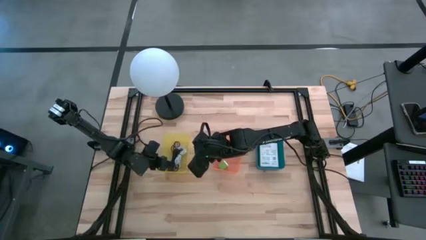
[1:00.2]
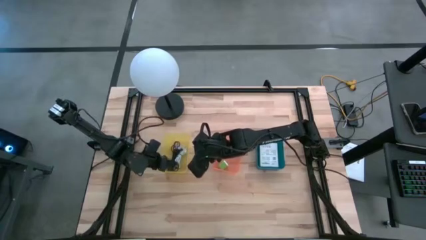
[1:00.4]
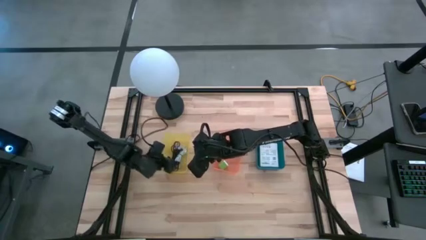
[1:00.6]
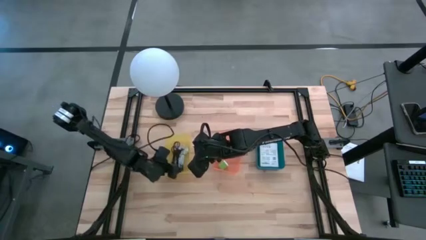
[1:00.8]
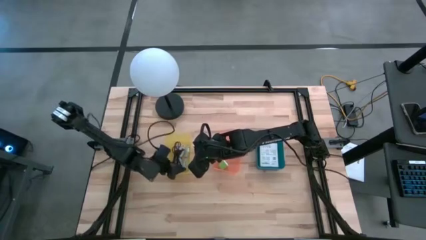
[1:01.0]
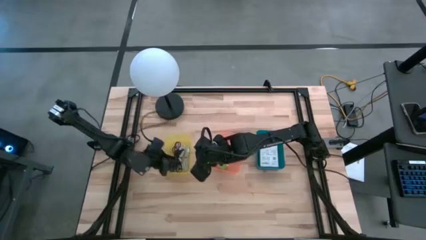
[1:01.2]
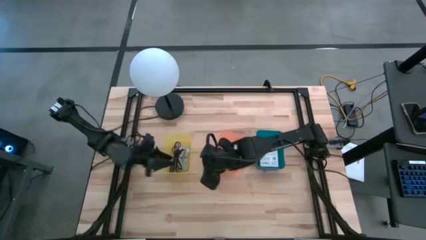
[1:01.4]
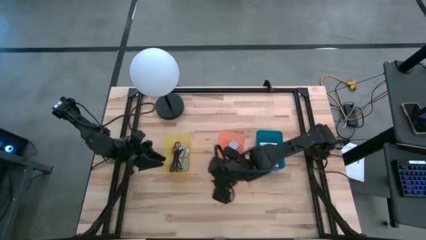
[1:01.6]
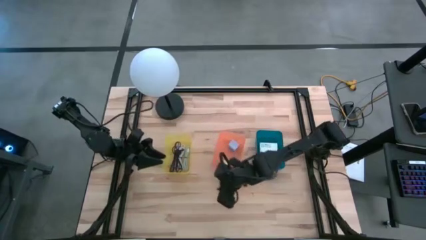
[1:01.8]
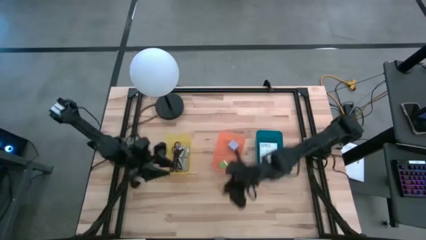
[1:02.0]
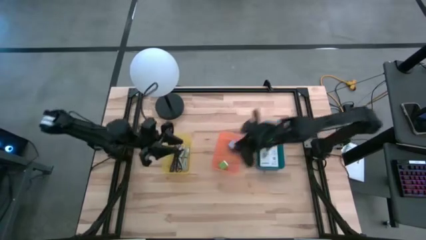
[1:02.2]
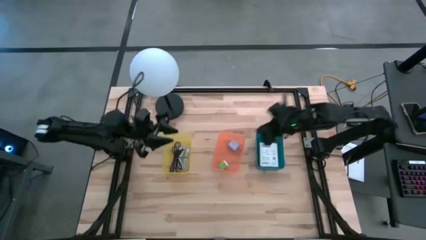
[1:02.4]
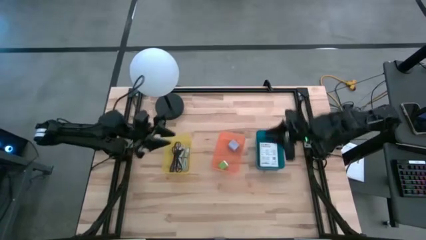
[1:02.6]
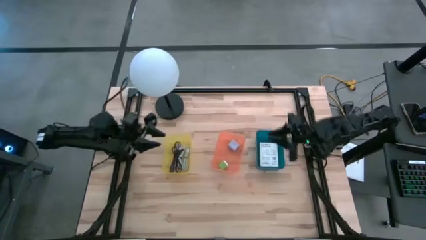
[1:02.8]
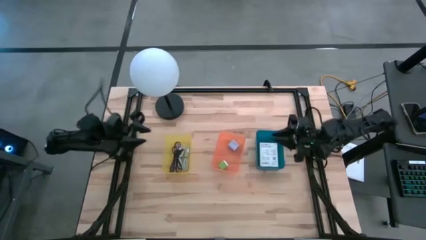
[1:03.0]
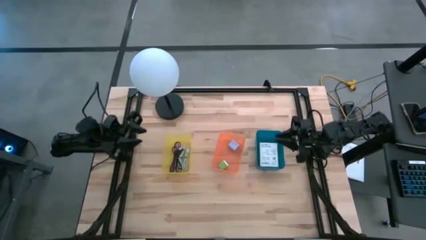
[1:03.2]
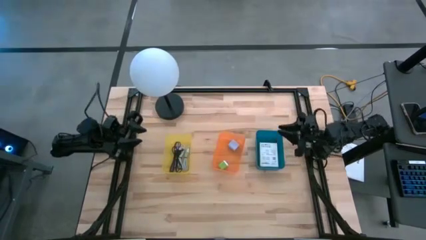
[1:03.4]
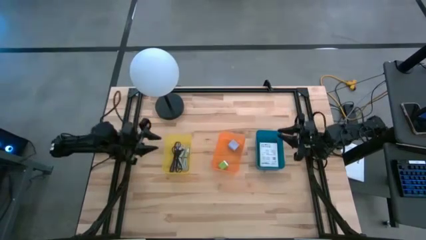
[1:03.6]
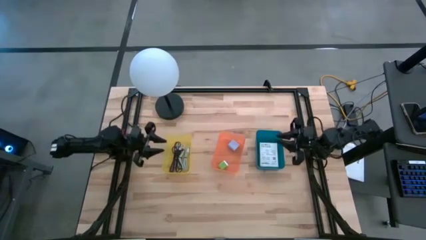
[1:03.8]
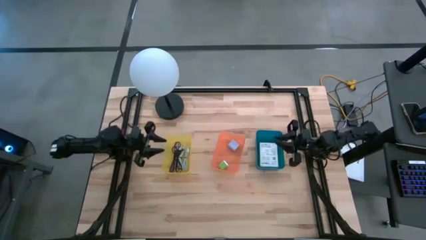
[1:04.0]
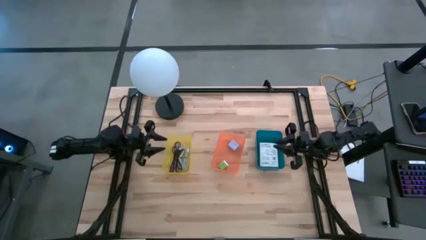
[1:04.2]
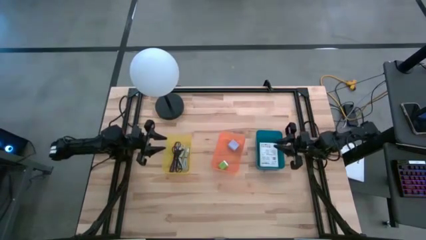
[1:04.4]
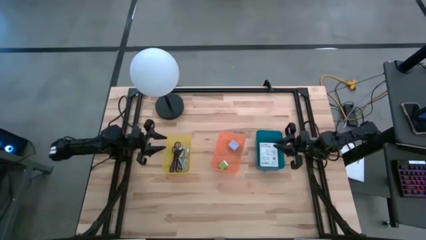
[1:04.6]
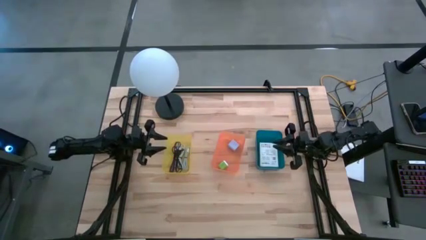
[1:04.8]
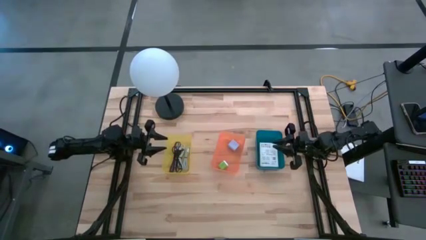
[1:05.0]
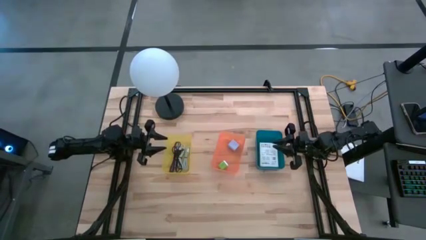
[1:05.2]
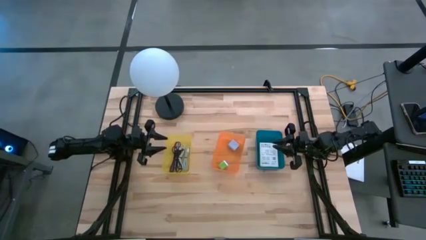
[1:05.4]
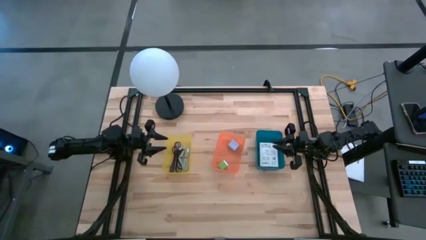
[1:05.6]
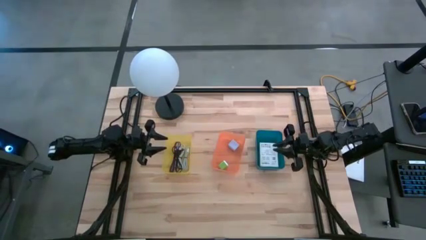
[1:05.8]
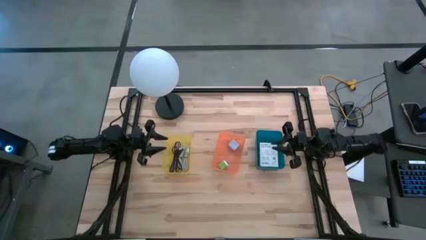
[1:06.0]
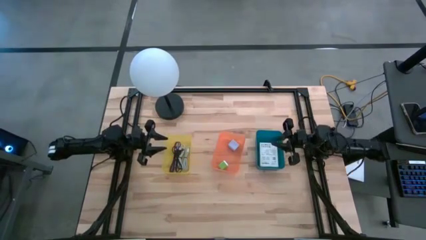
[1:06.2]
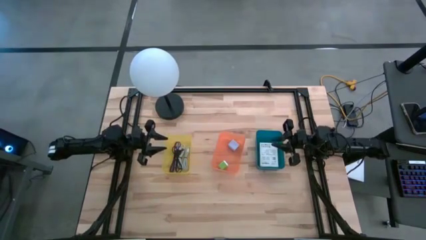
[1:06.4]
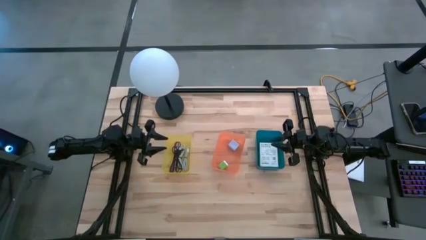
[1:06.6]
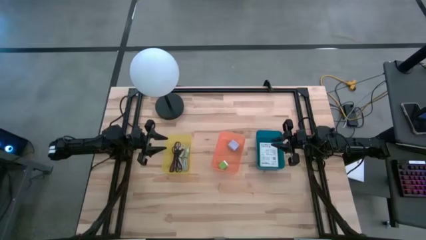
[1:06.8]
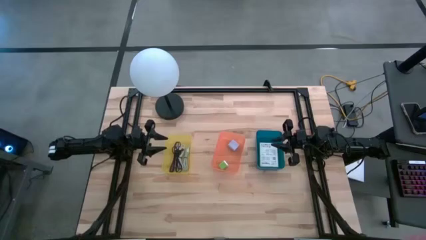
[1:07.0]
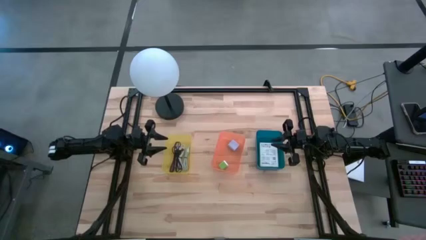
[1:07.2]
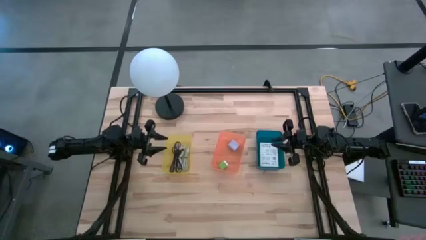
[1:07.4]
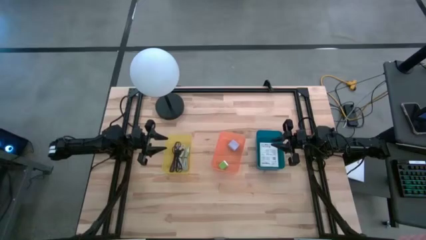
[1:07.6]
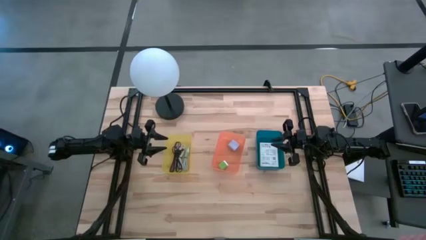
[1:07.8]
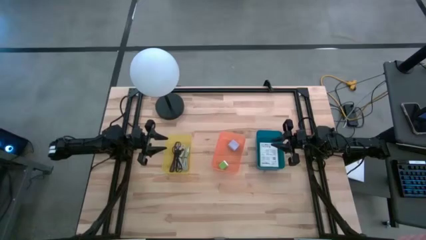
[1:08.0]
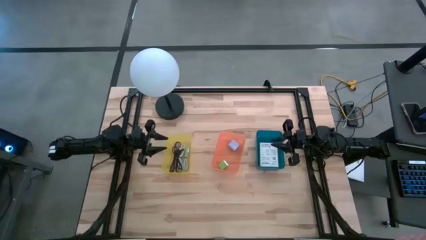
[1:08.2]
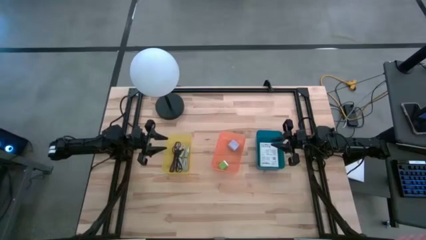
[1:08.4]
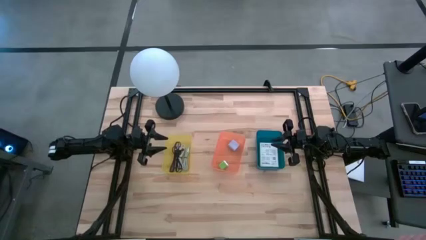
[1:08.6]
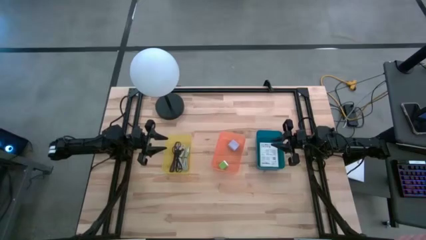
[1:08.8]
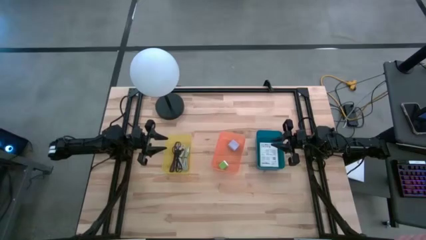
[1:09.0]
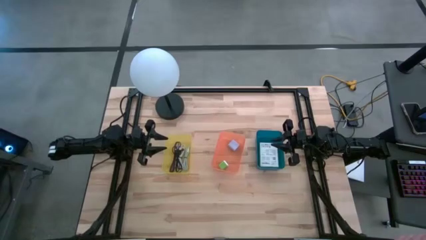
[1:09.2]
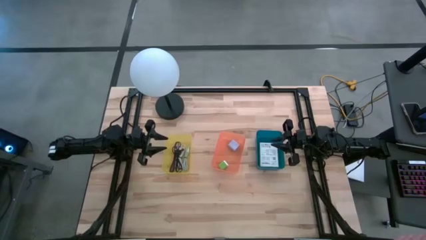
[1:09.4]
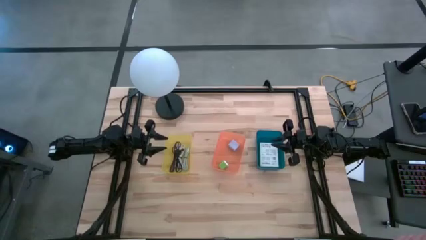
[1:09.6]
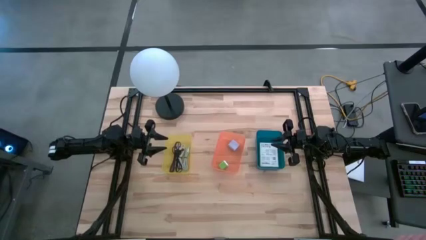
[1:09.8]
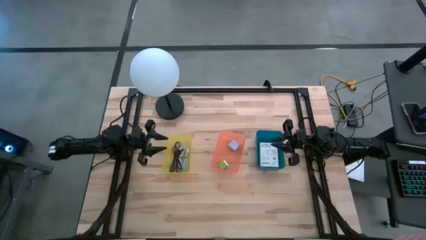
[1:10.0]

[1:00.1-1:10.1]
Task: Pick and place items into bin
Return to Home Position

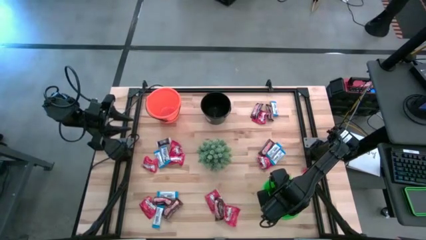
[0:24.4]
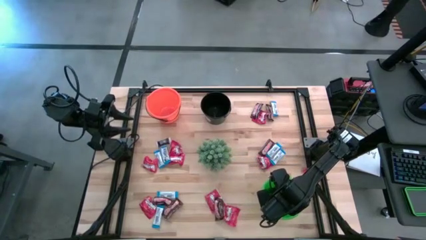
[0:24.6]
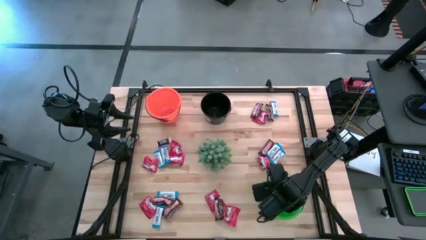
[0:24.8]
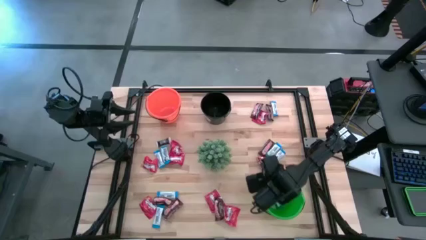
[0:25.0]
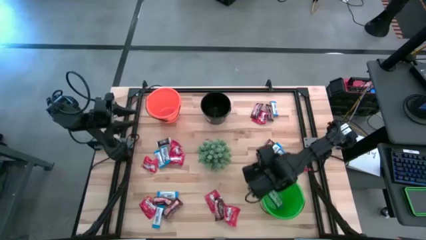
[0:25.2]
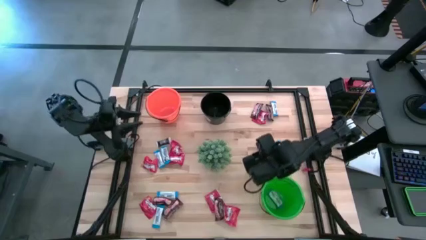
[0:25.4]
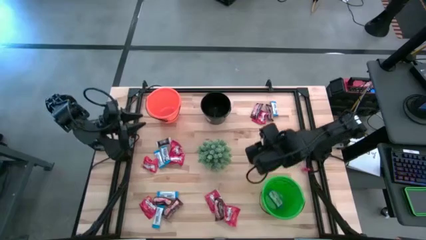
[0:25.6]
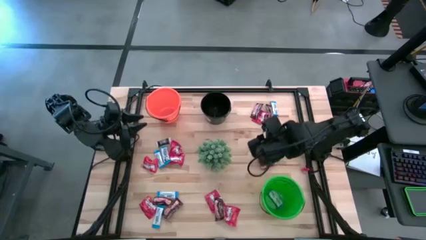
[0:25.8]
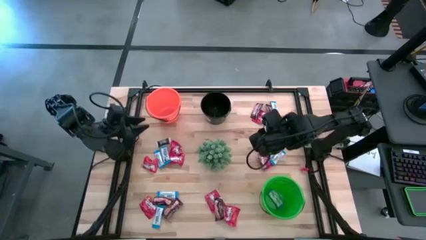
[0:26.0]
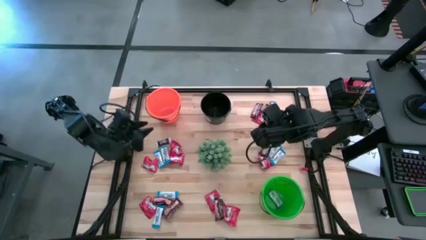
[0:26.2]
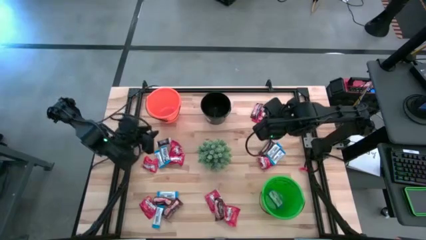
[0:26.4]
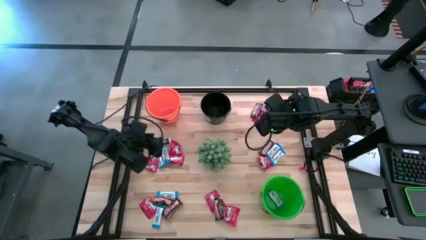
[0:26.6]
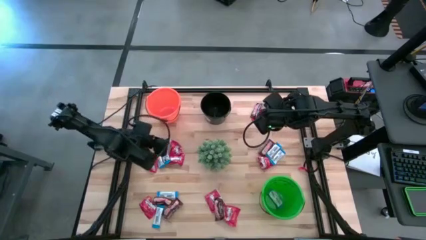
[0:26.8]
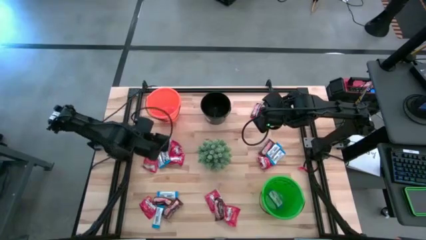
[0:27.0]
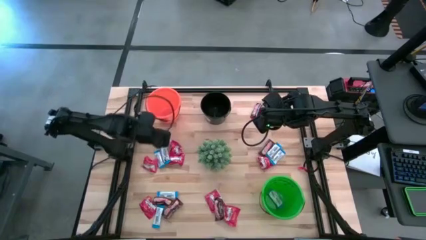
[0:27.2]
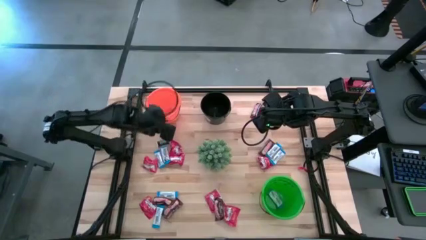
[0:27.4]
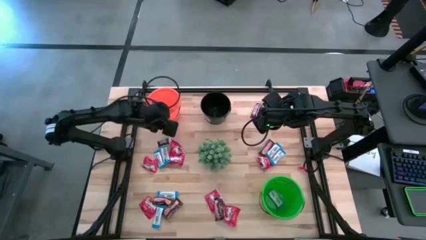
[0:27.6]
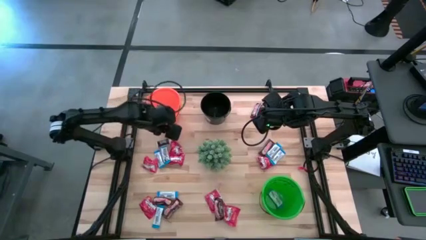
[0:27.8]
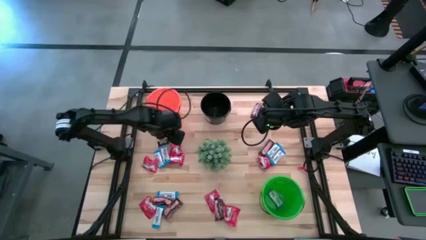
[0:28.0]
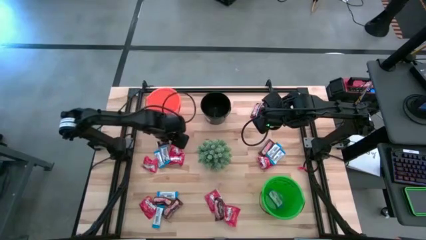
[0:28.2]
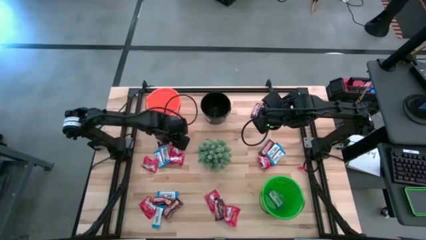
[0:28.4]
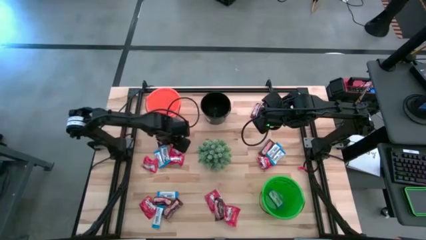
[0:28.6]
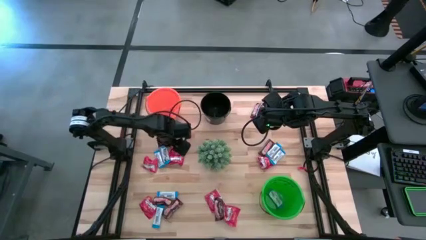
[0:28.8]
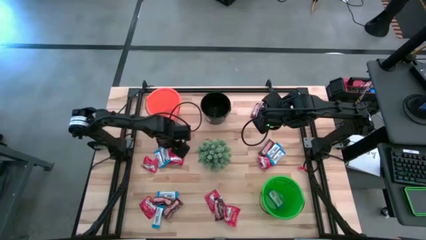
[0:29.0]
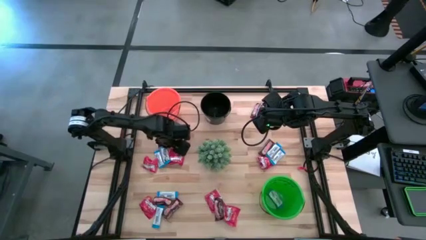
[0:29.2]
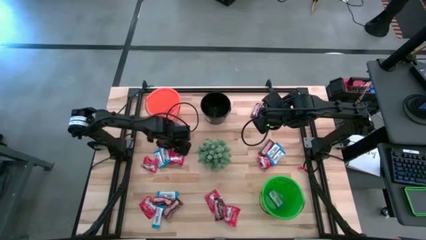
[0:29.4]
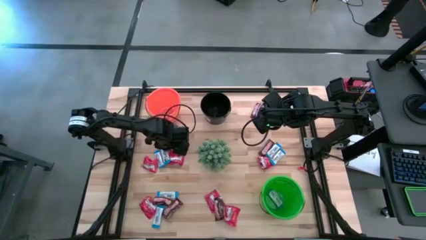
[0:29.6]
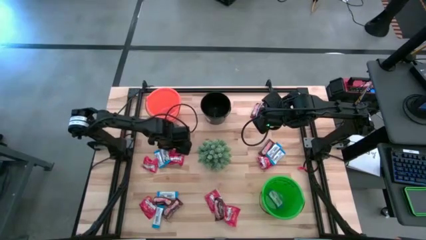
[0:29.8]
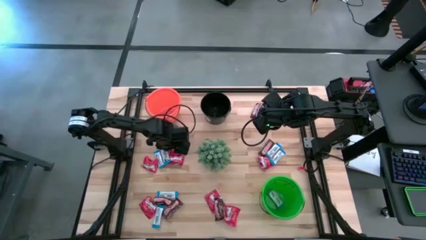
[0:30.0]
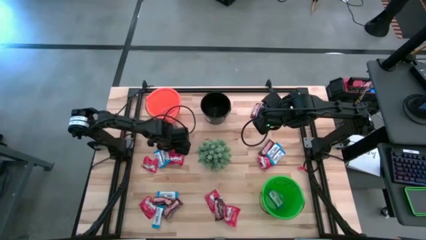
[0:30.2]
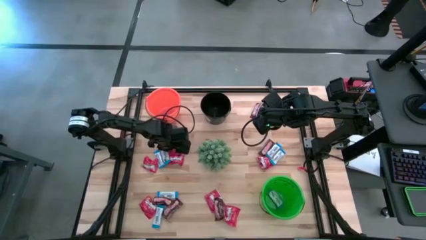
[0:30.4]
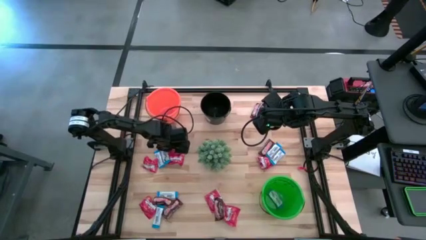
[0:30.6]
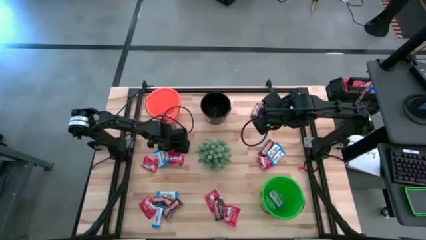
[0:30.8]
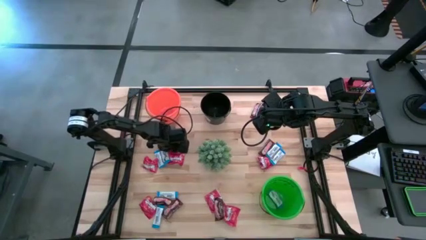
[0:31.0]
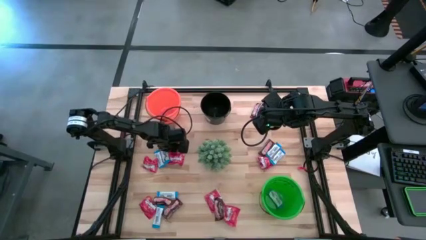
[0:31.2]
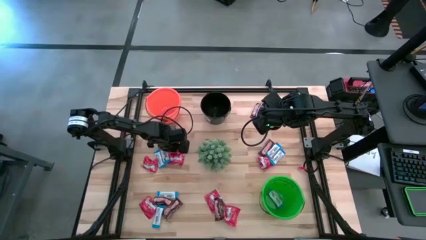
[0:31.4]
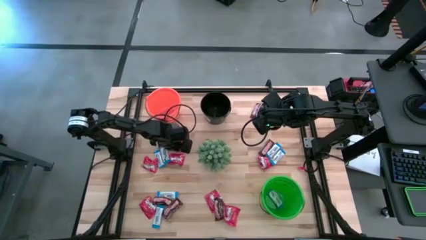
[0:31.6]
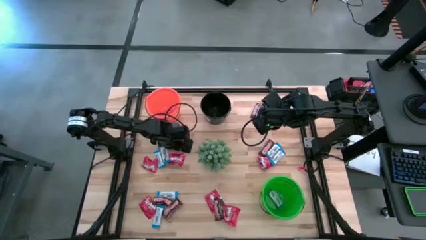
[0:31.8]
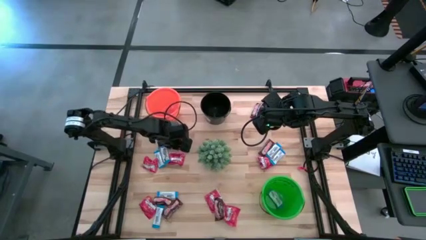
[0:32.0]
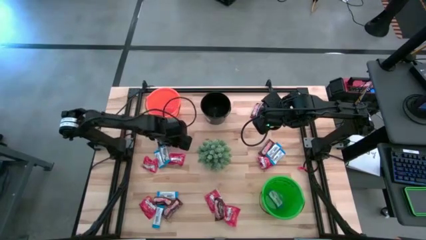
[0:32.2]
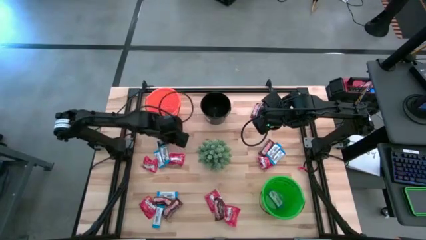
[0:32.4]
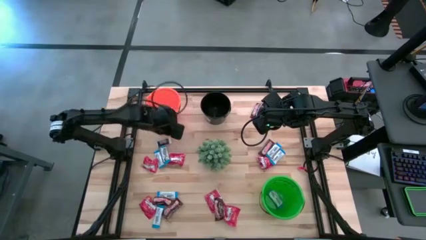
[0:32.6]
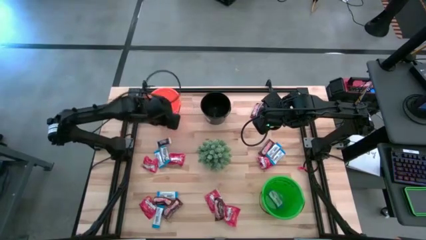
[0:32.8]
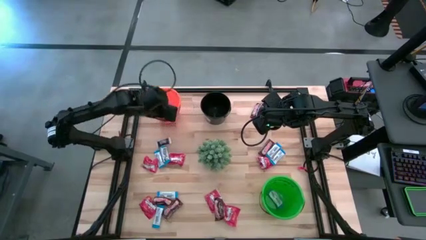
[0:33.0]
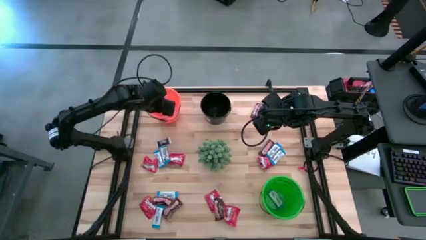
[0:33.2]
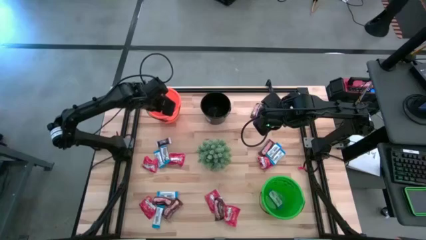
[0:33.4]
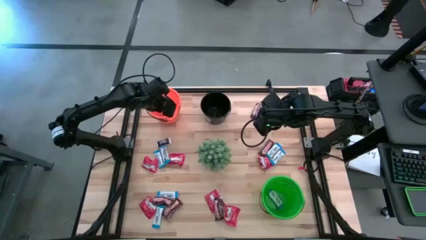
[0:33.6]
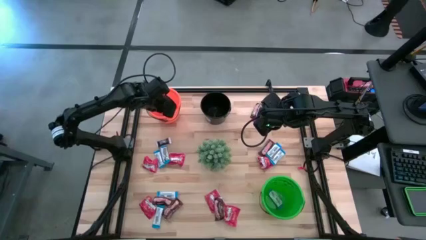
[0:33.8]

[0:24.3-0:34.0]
Task: Sort candy
Put the red candy into the orange bucket
